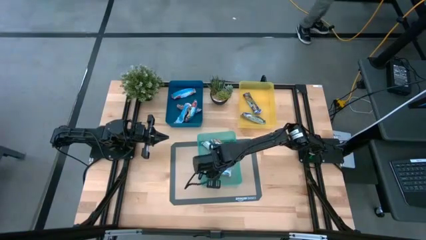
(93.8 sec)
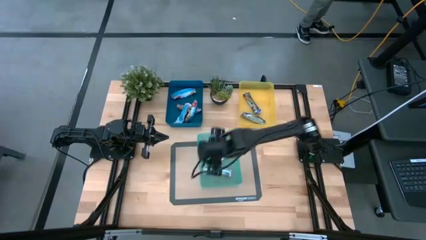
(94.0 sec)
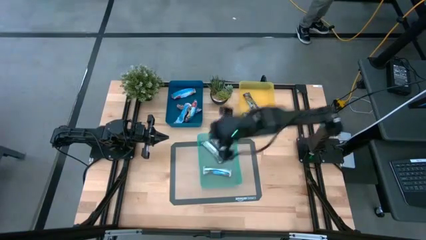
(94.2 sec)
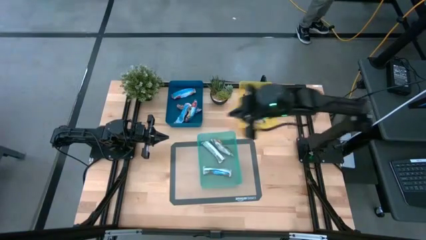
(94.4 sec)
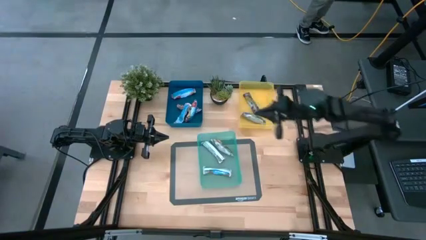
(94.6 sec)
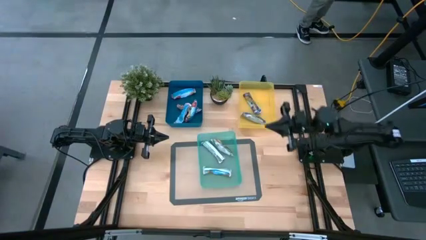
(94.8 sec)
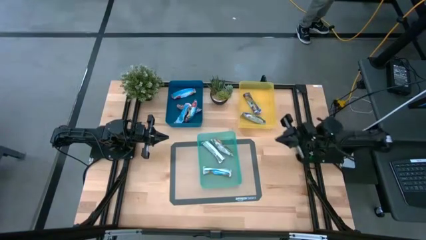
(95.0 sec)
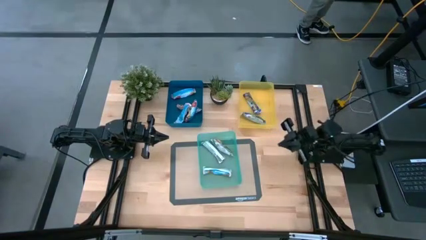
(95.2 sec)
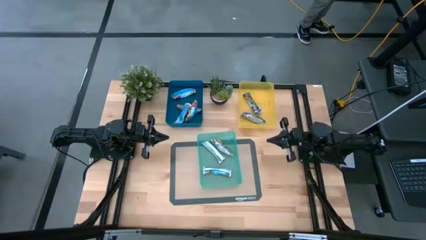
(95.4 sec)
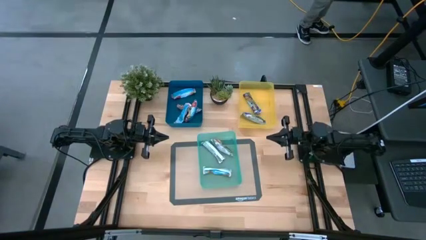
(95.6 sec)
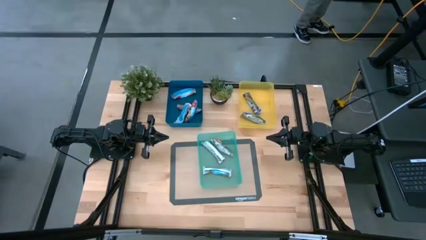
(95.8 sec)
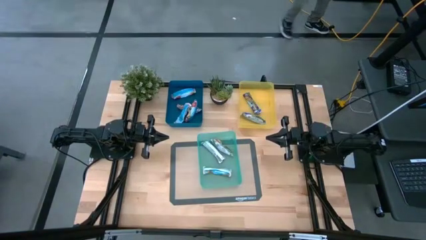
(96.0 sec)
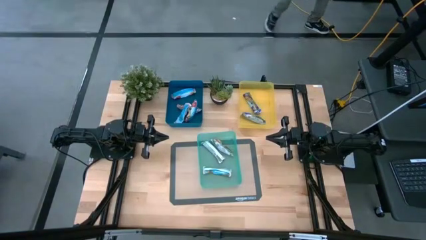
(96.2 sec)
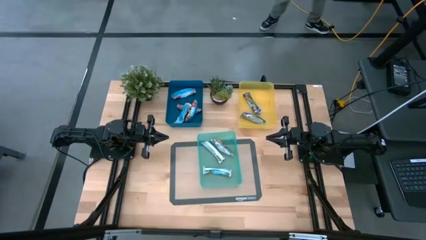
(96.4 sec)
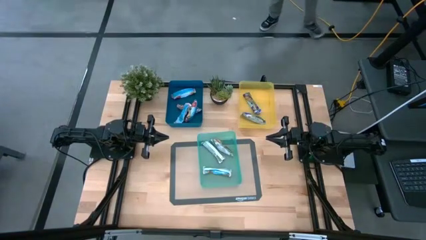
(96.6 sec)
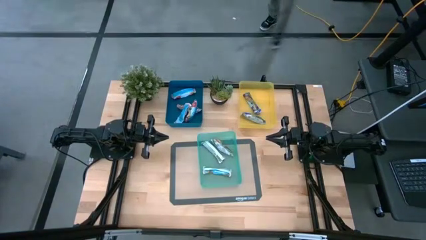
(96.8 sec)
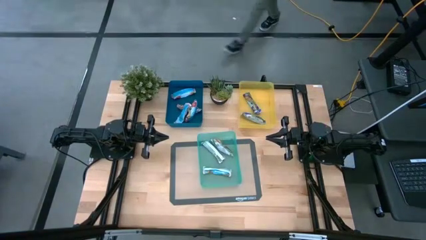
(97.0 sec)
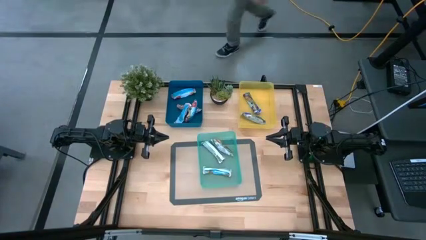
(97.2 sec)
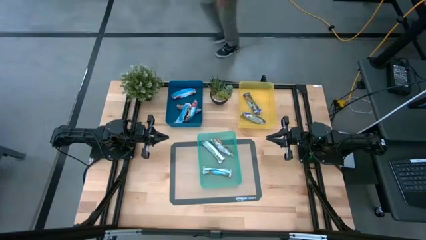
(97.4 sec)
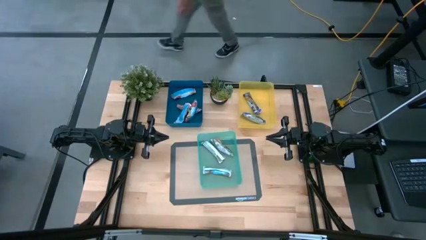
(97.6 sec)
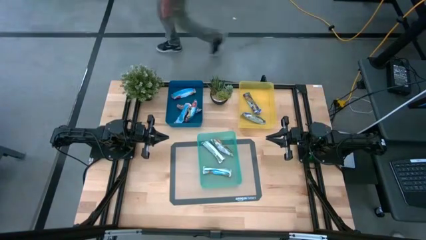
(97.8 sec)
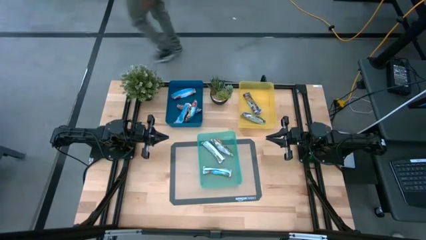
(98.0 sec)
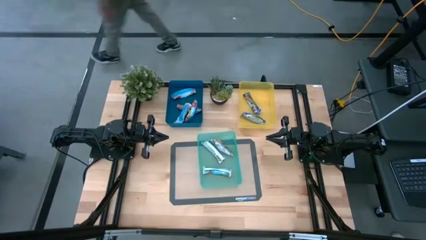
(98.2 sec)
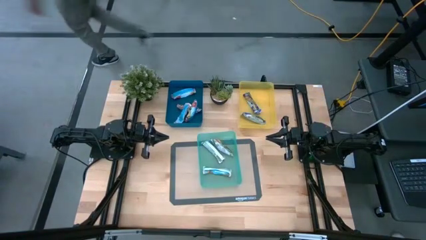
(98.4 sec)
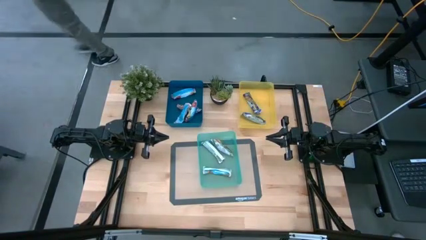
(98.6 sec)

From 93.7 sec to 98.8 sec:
Task: Pick and place Granola Bars by type
Return to Home Position

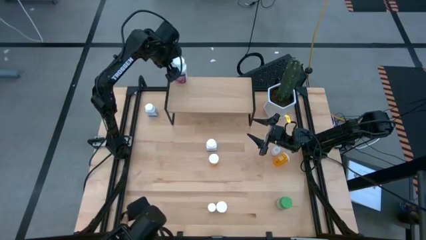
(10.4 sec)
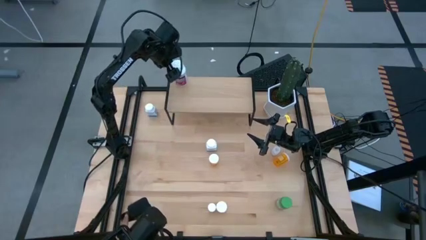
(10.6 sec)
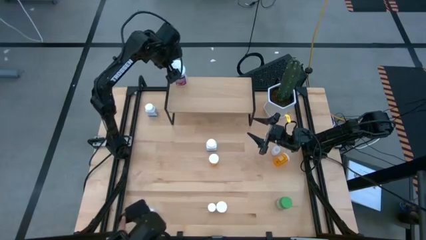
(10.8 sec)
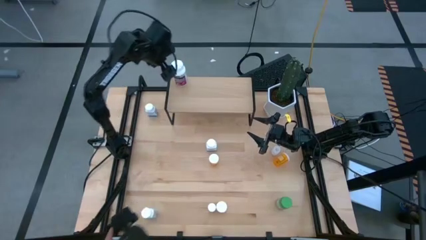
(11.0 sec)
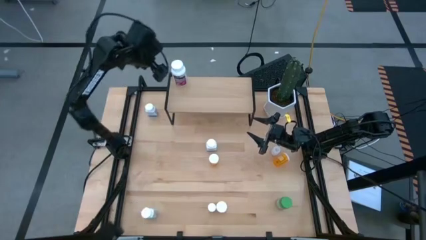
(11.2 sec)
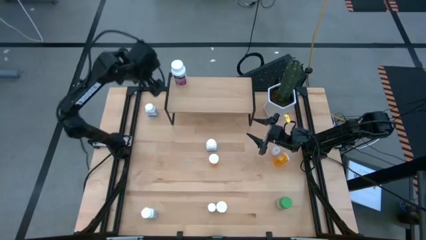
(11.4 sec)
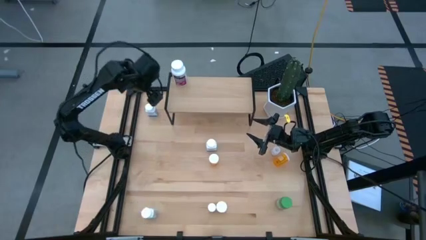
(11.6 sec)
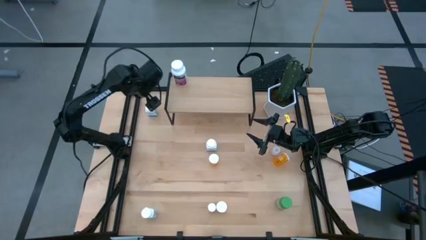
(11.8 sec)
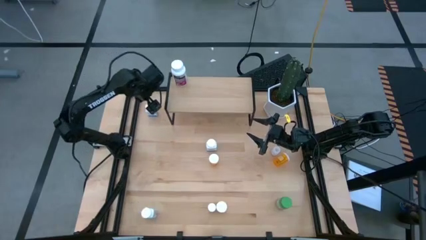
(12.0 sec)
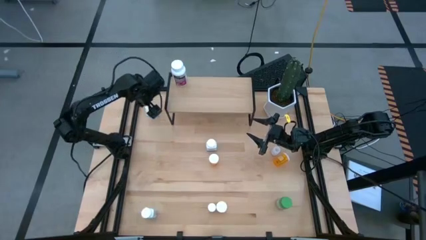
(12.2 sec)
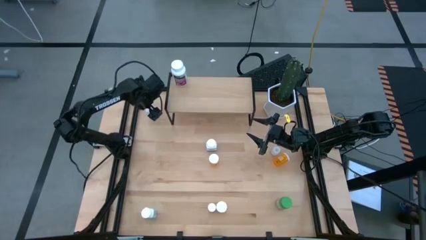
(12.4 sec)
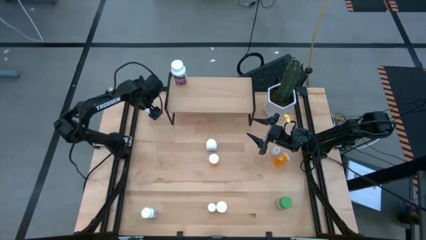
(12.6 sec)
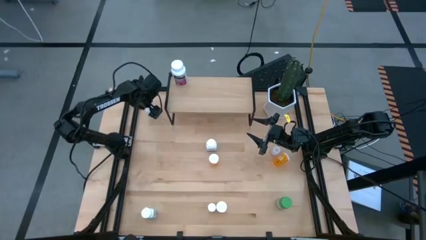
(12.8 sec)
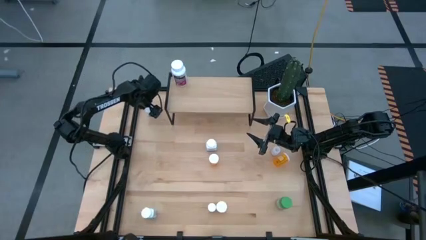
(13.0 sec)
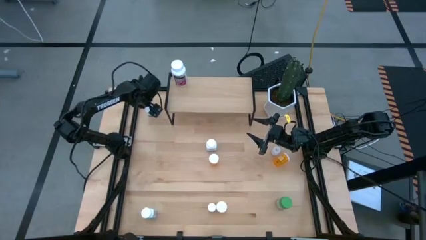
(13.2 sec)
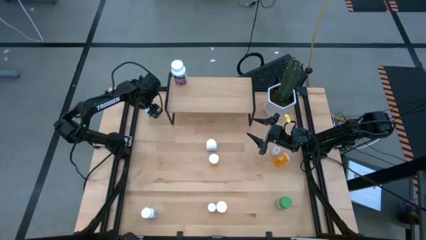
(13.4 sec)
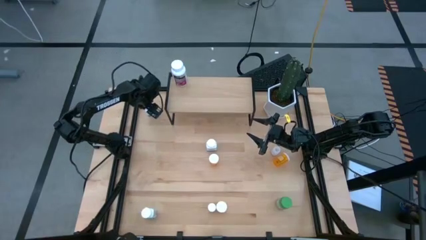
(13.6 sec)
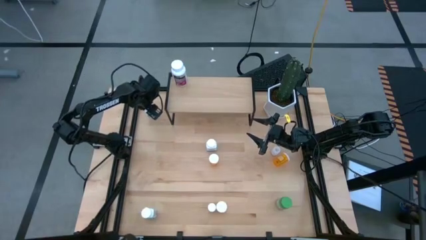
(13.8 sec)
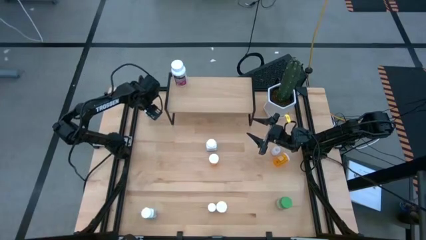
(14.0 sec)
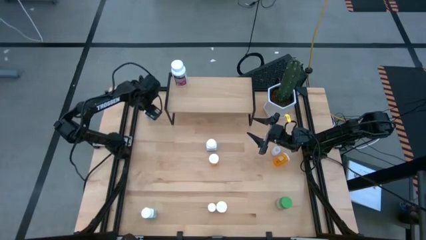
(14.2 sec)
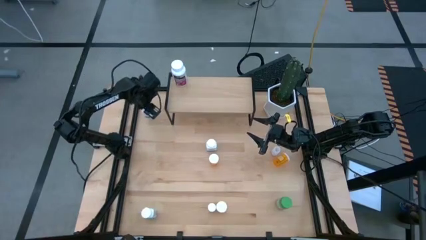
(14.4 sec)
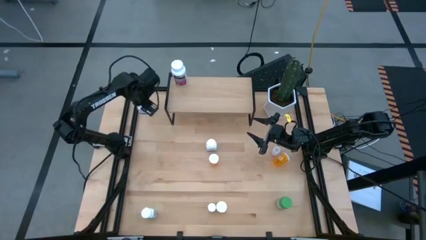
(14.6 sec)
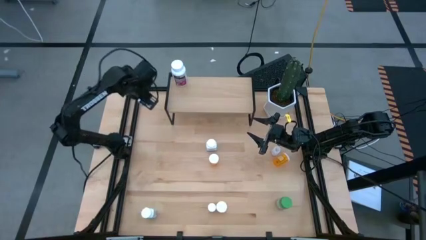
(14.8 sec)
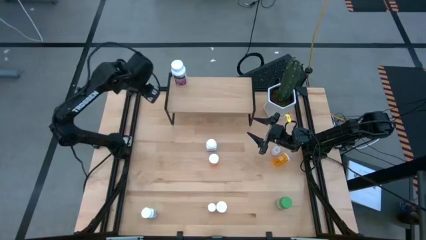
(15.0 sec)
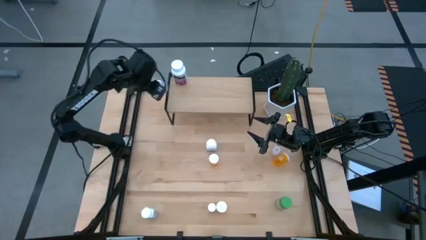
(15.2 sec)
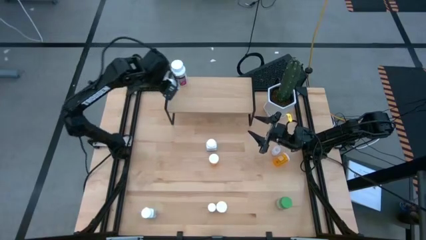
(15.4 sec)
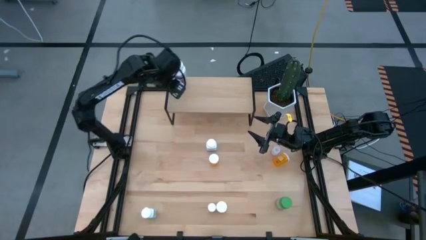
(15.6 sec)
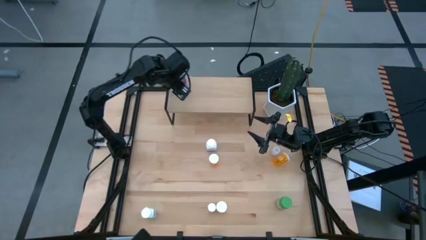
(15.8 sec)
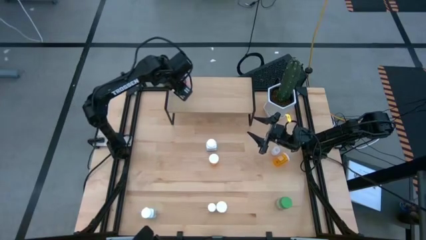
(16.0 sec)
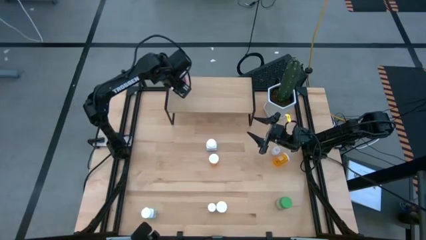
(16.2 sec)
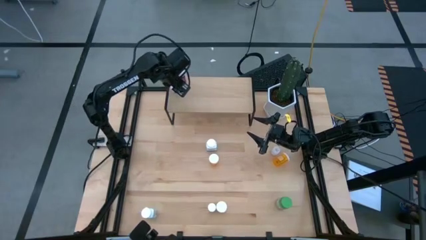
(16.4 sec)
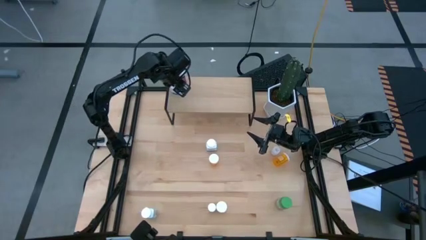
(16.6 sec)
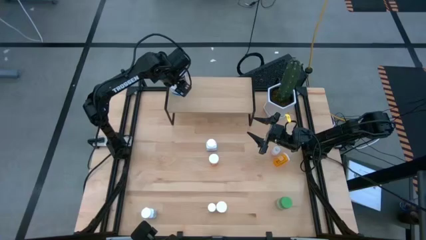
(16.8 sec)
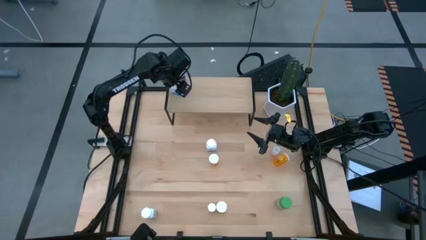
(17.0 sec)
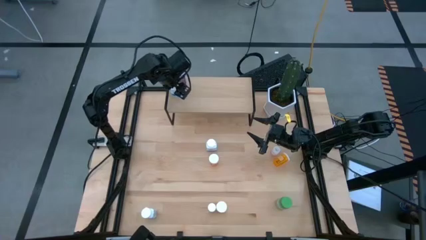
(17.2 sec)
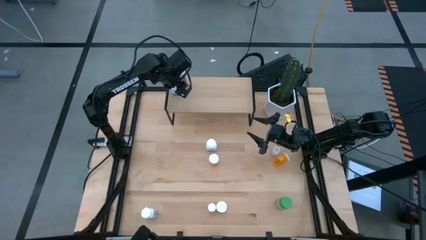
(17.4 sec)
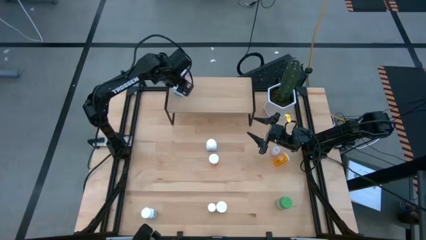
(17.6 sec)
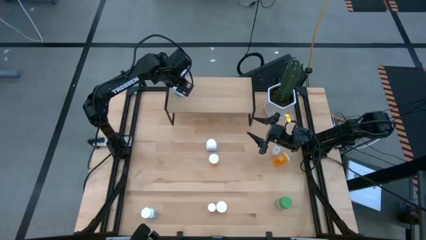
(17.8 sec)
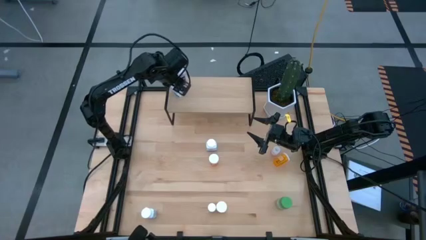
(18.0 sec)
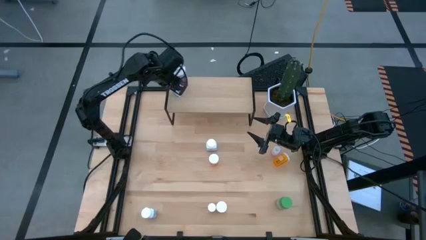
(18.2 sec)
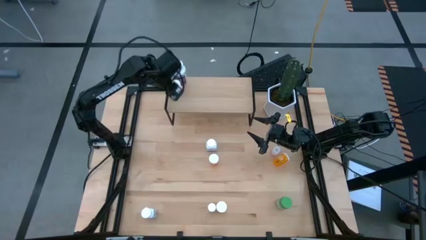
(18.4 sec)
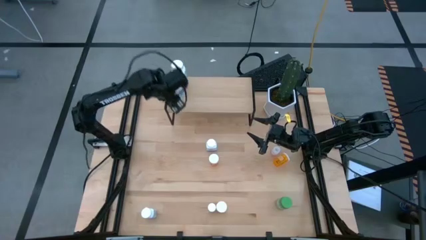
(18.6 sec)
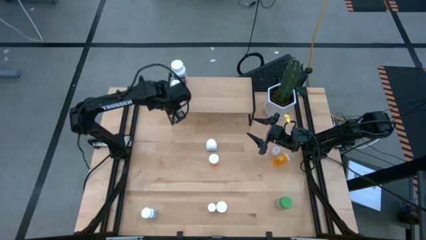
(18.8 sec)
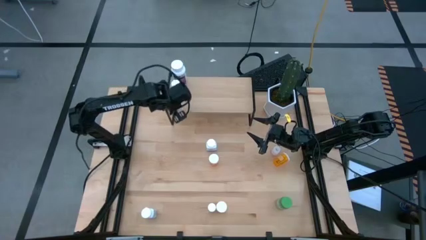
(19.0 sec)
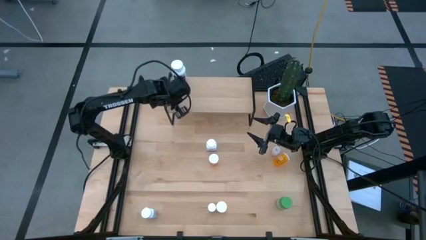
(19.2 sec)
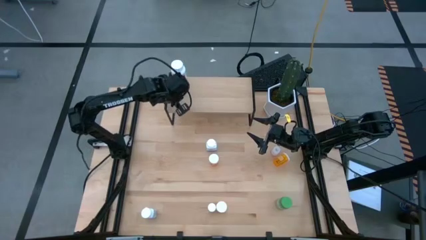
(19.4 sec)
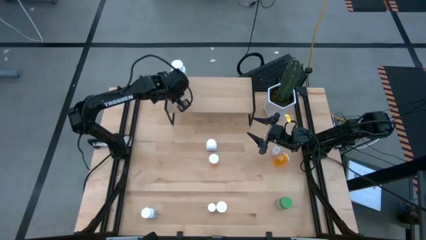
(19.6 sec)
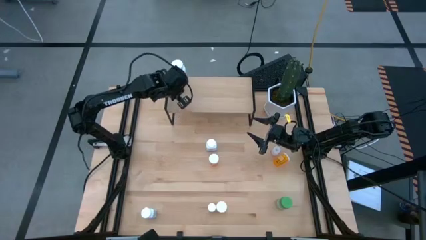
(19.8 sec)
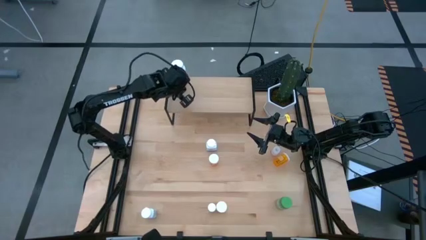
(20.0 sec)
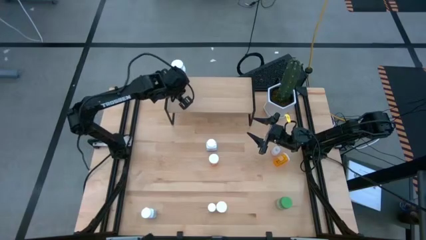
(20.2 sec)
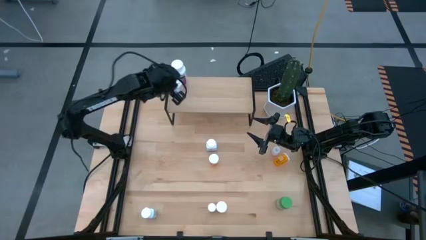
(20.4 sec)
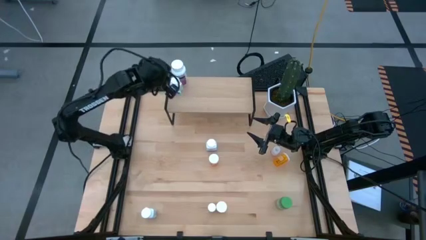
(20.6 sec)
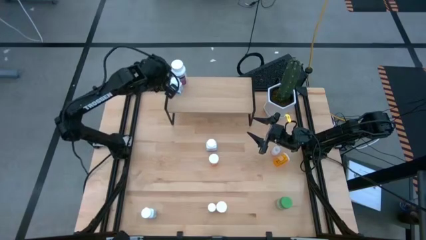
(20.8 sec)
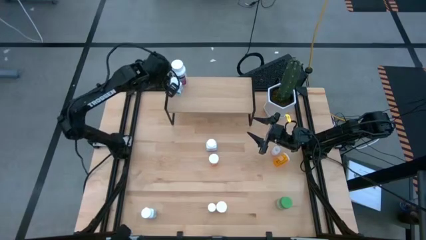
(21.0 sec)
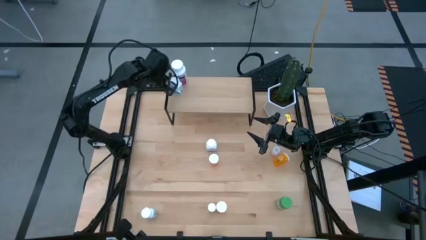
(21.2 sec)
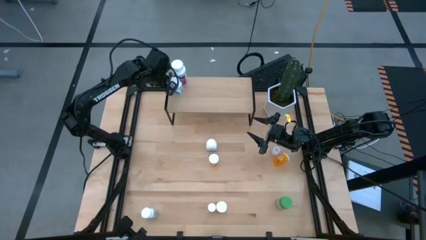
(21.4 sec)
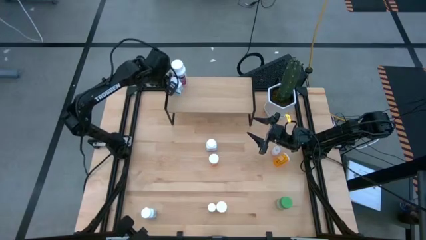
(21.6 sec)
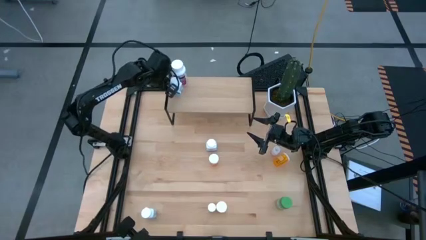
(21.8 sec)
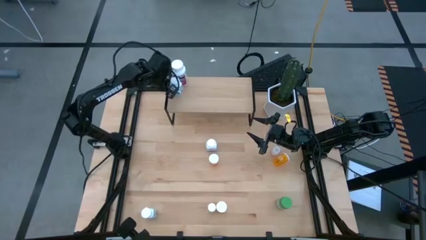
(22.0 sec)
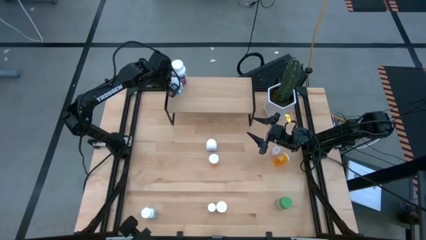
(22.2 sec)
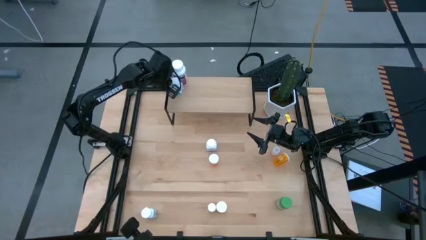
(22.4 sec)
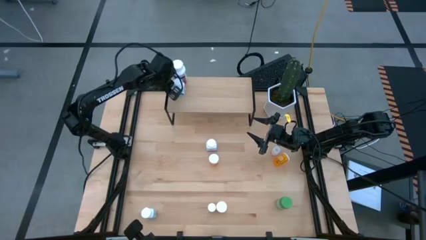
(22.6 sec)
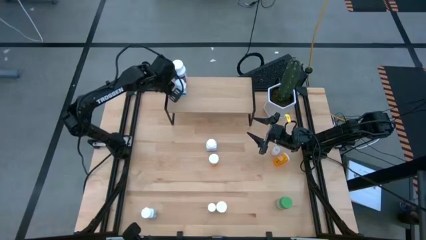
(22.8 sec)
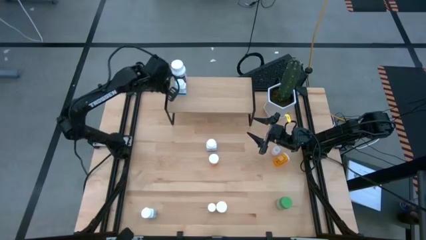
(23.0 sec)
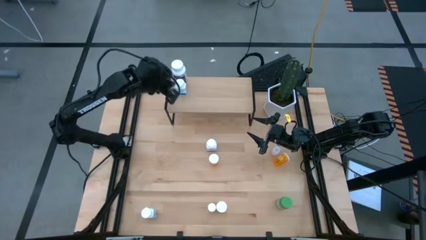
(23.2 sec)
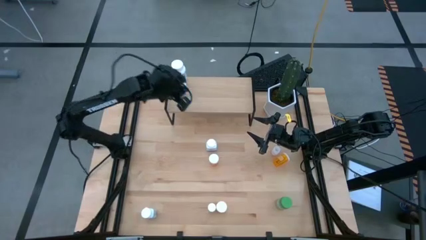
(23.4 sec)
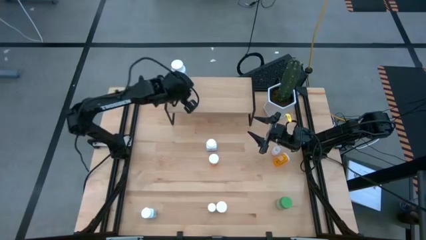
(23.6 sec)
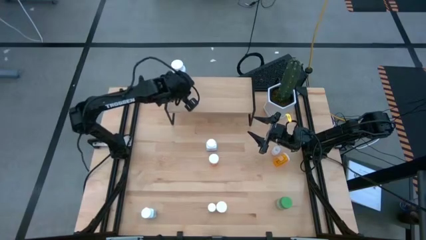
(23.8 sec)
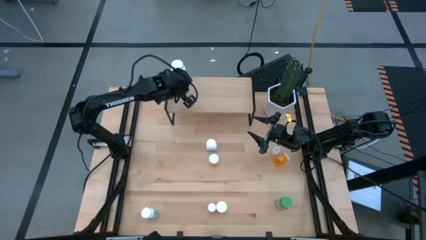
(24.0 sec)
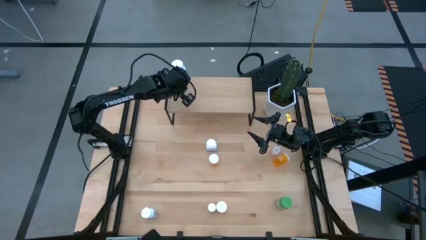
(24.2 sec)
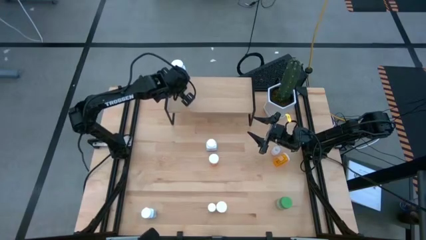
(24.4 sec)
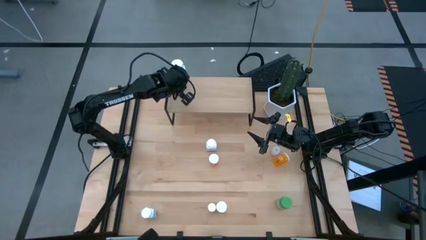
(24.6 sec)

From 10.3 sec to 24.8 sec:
Task: Pick and place medicine bottles onto shelf by color
Put the top white blue pill bottle on the shelf
